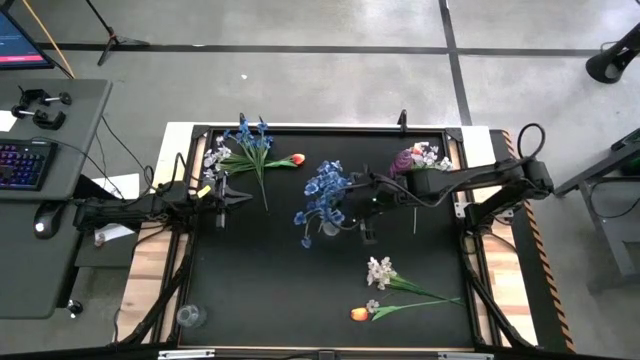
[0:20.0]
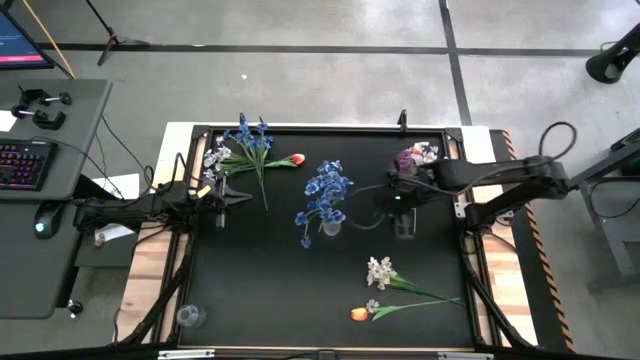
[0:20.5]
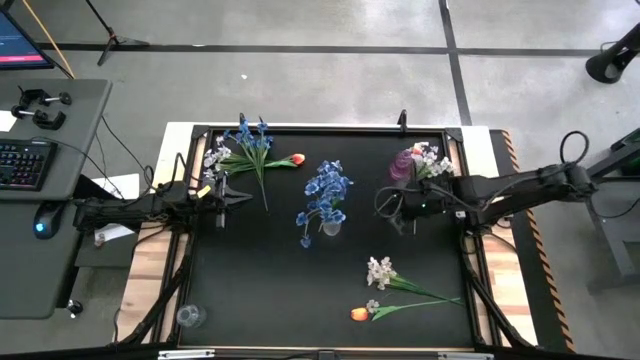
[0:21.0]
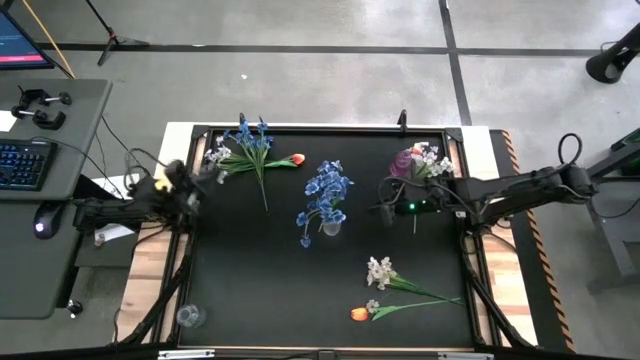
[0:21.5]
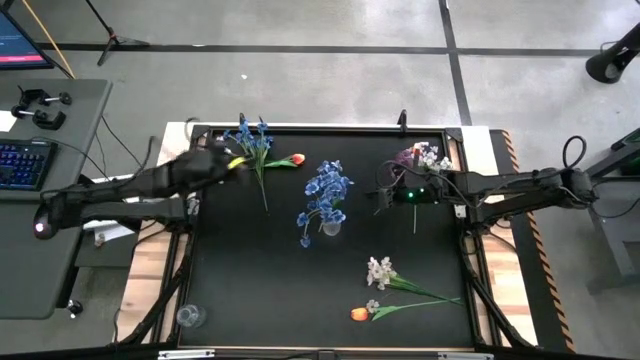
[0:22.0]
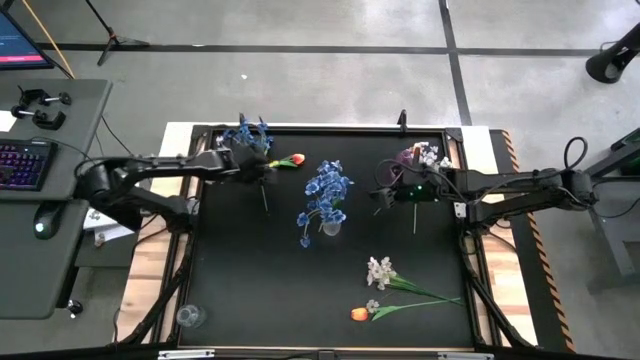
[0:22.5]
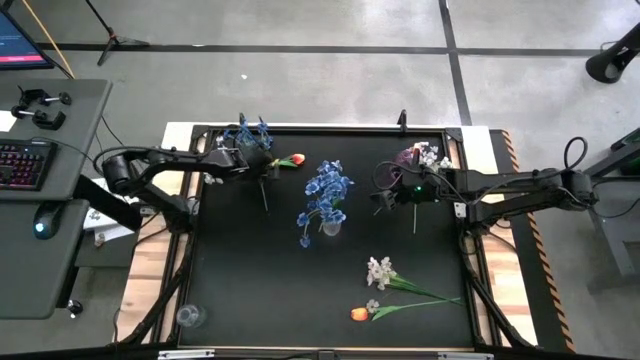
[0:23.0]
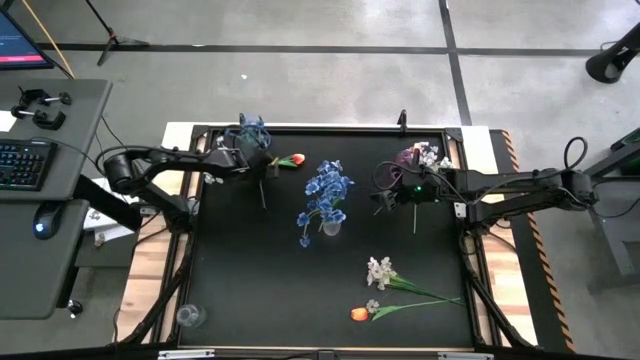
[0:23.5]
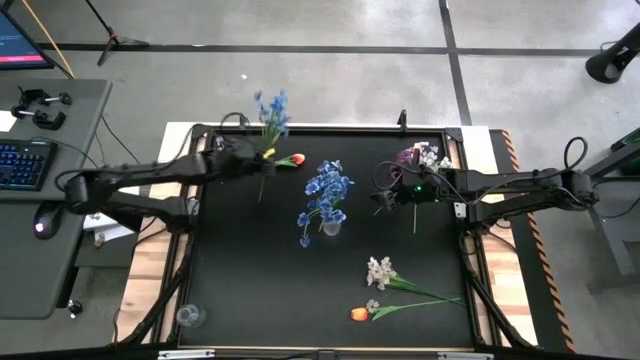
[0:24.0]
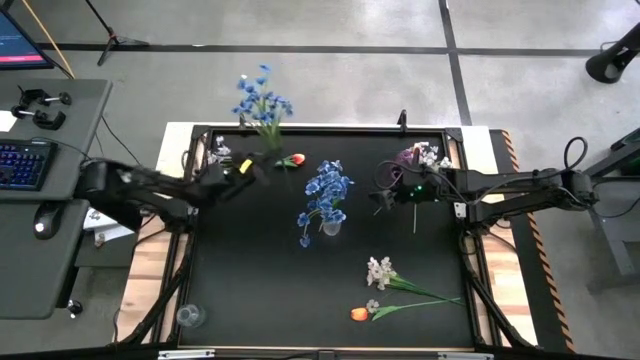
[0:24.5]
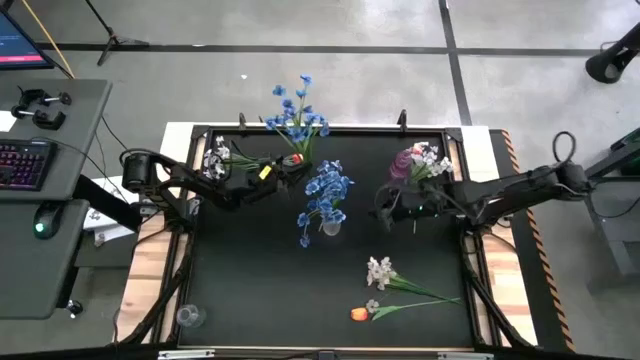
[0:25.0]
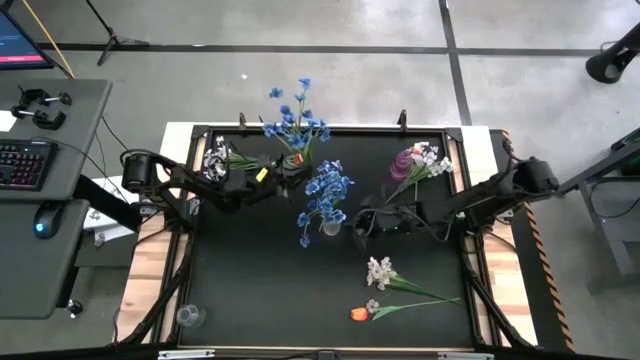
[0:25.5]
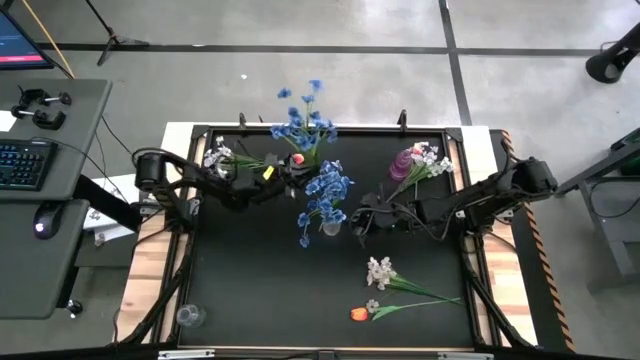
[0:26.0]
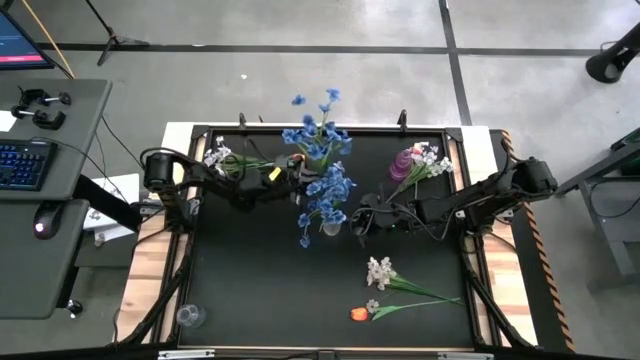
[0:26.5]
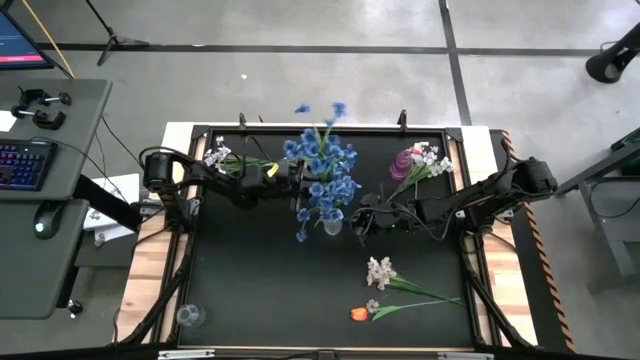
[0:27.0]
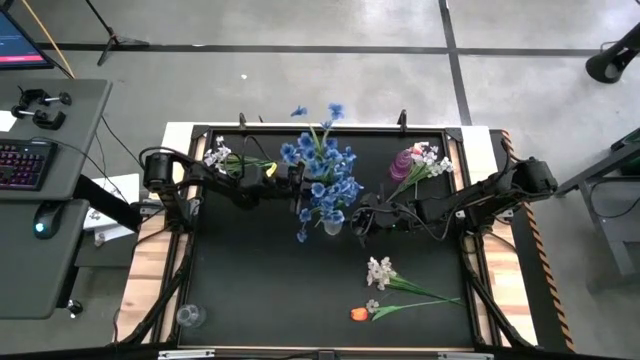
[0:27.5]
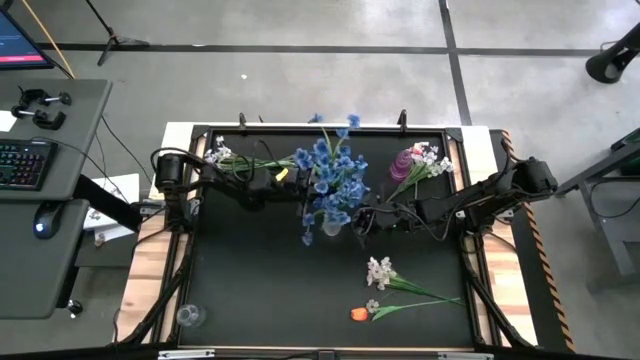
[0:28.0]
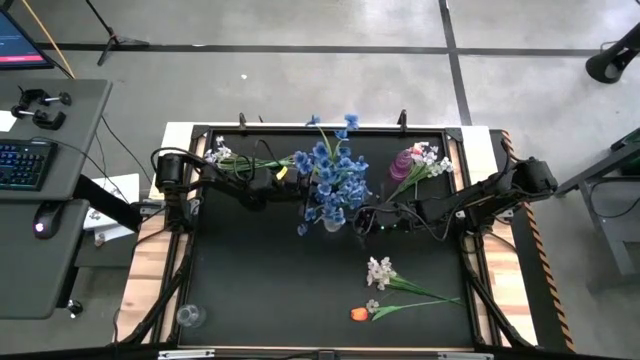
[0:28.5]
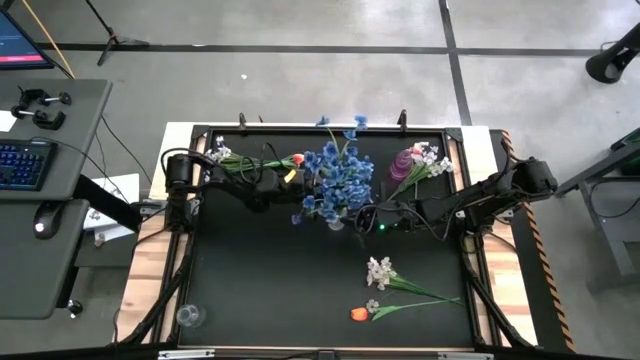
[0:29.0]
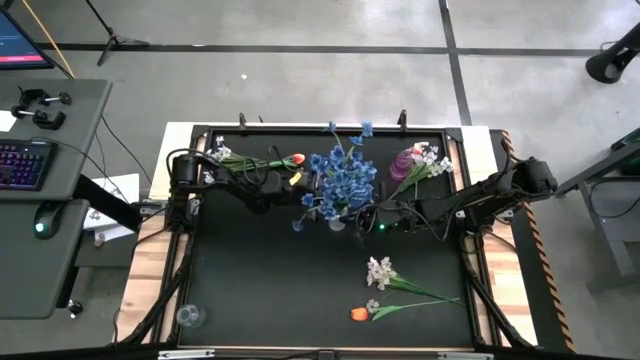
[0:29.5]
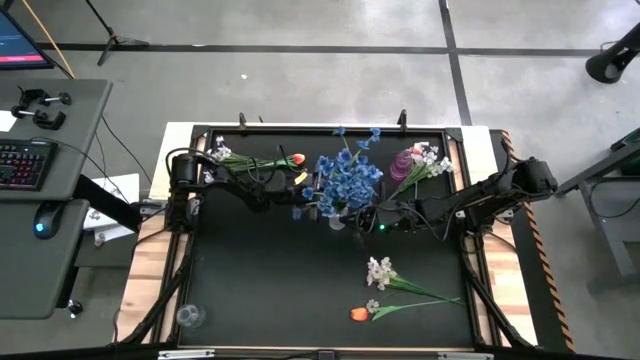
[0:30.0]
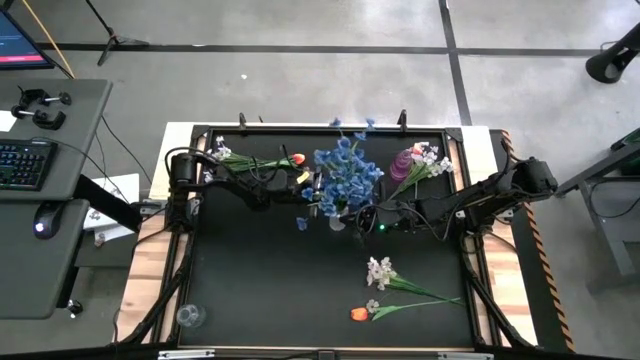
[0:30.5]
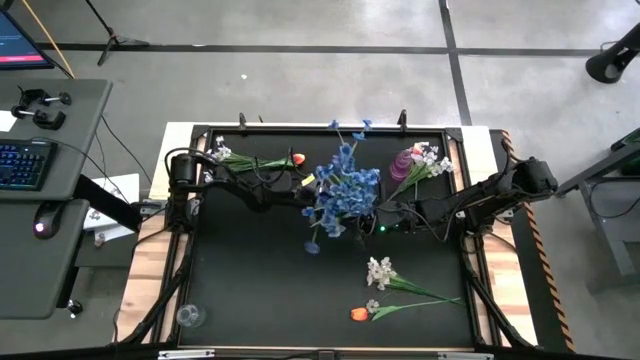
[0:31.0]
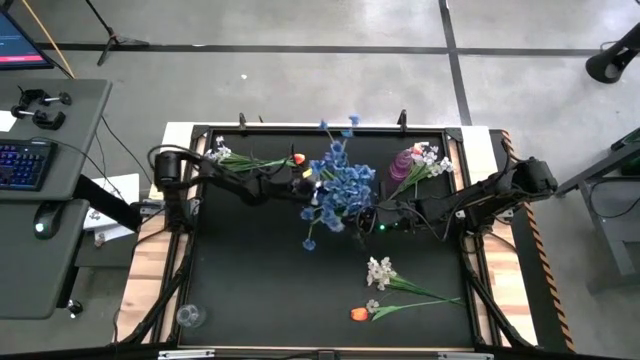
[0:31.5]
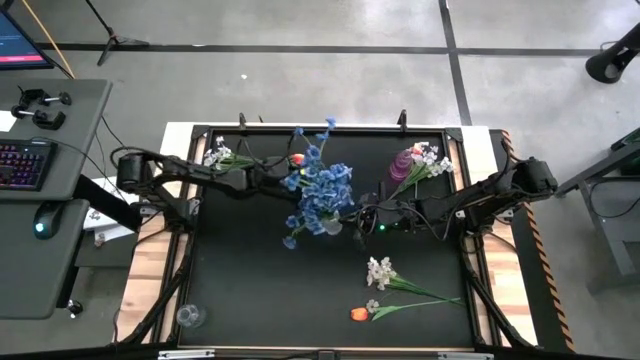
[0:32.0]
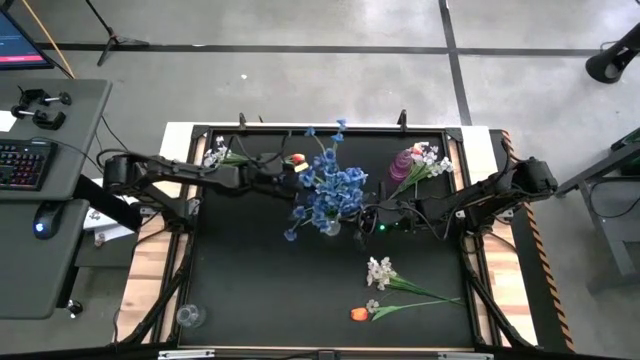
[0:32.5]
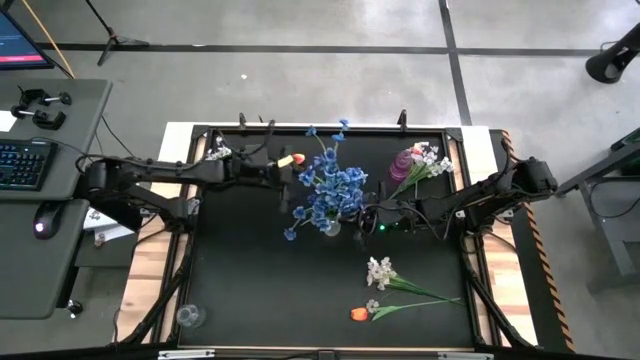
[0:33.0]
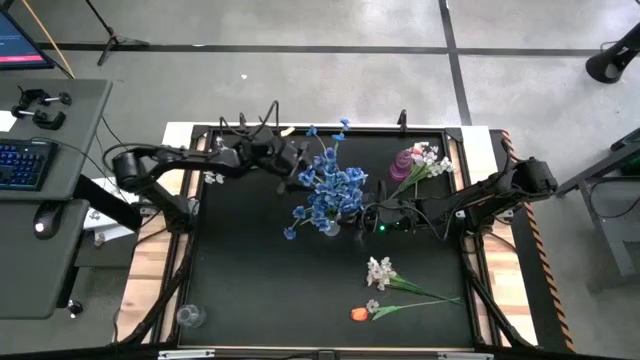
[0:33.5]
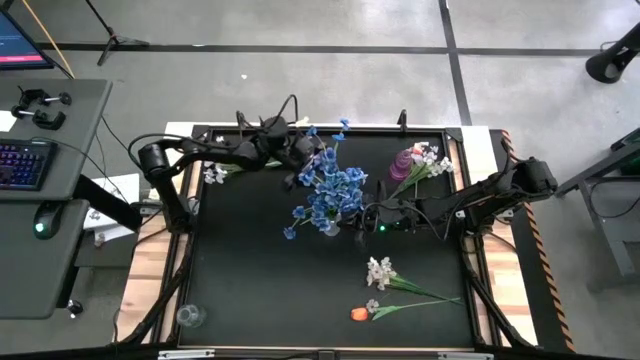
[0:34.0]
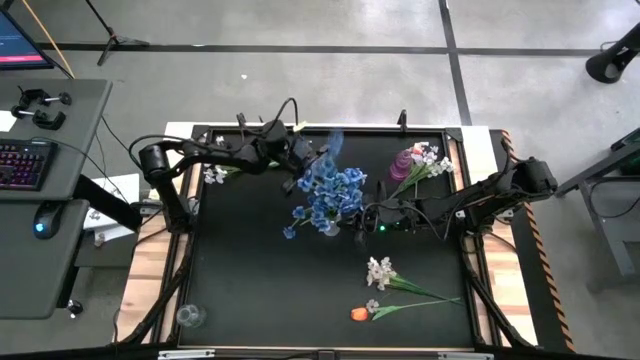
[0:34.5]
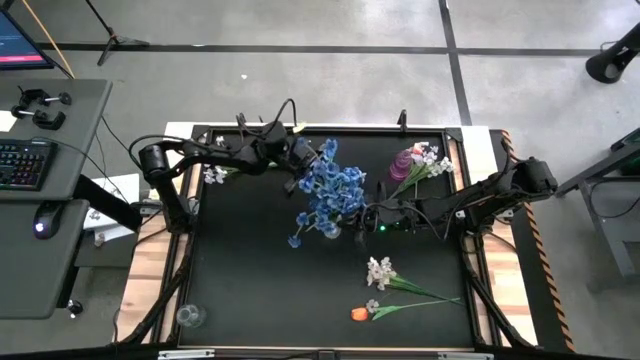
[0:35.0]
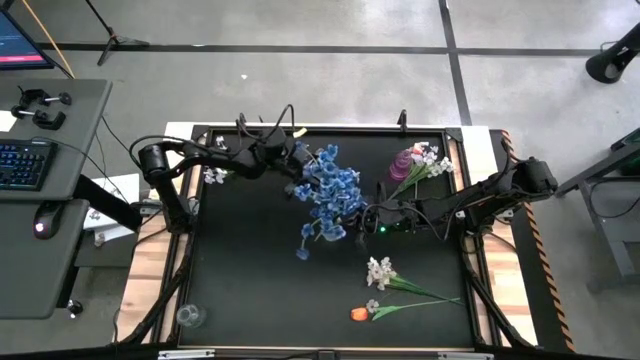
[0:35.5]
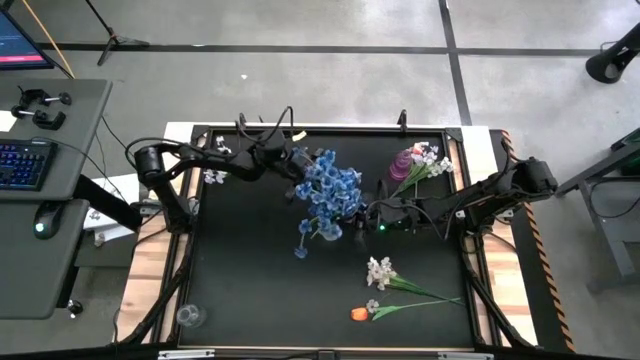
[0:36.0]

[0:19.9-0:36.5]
Task: Sort flowers into vase by color
Put the blue flowers into the top transparent vase
